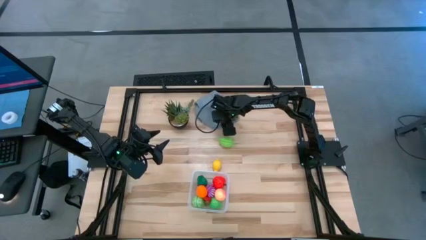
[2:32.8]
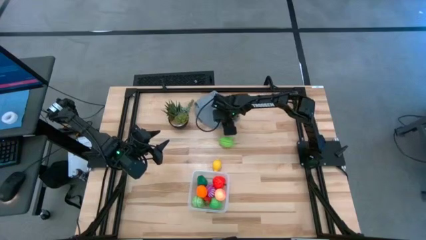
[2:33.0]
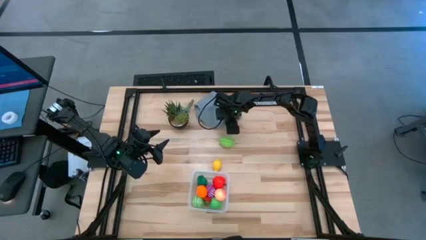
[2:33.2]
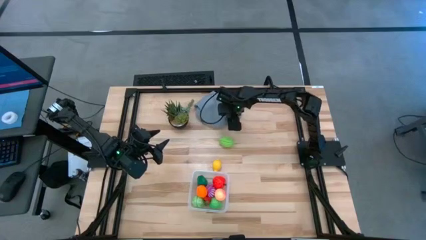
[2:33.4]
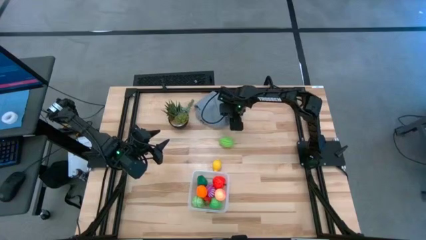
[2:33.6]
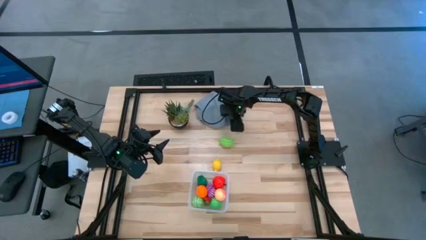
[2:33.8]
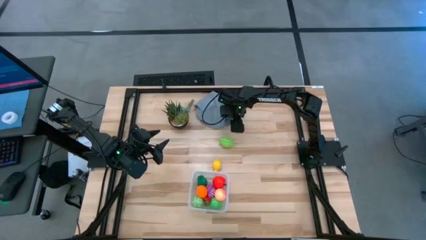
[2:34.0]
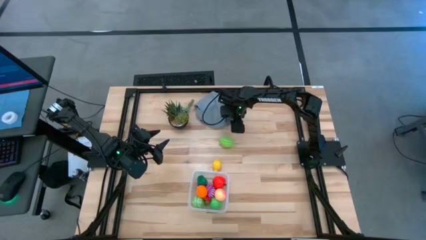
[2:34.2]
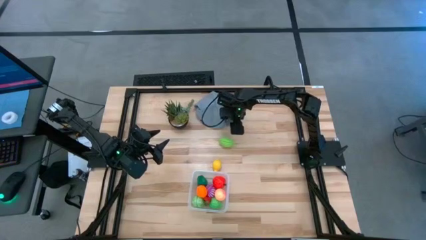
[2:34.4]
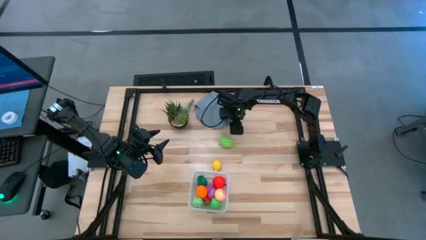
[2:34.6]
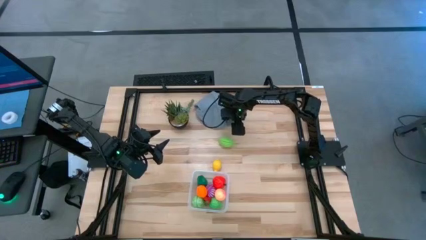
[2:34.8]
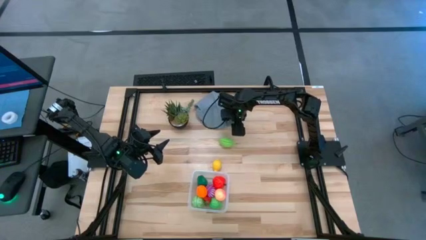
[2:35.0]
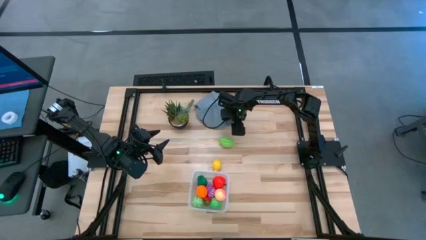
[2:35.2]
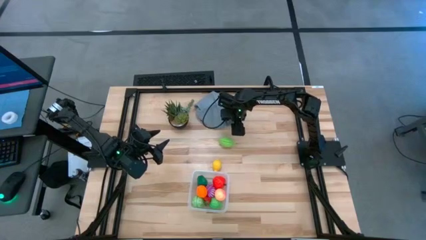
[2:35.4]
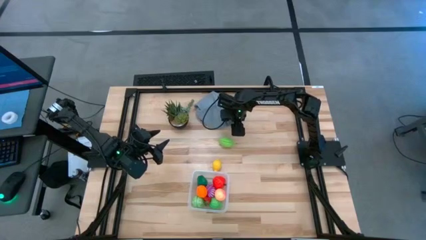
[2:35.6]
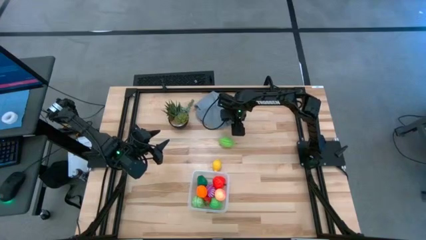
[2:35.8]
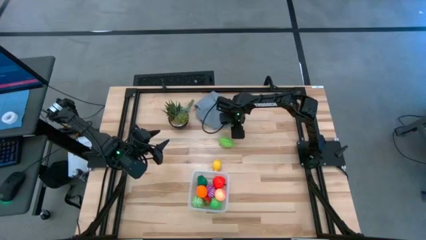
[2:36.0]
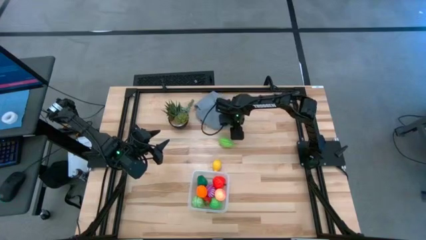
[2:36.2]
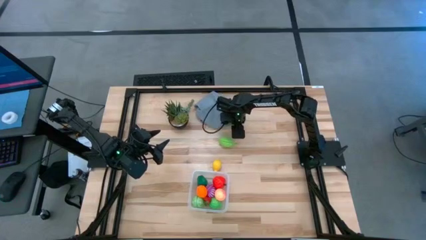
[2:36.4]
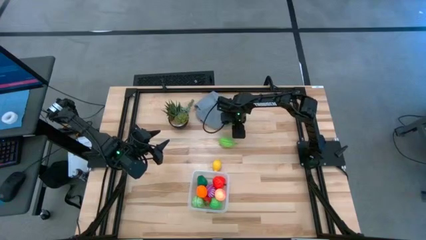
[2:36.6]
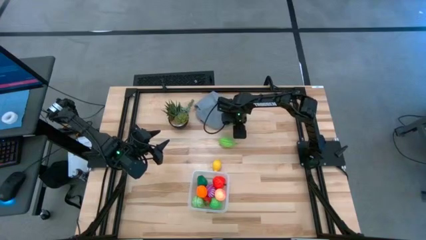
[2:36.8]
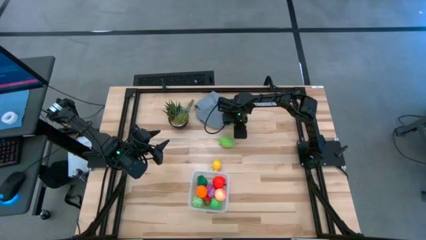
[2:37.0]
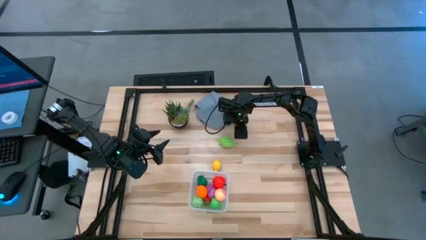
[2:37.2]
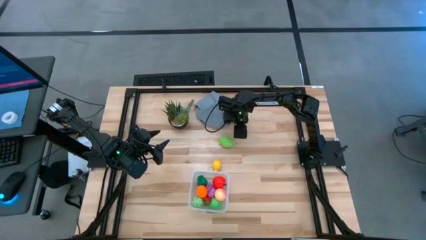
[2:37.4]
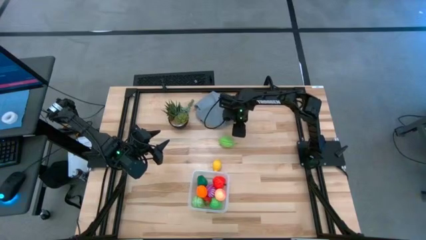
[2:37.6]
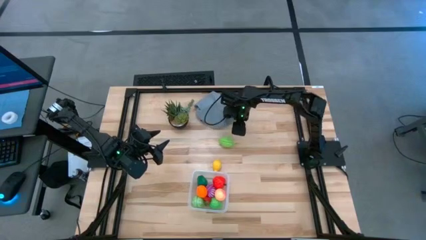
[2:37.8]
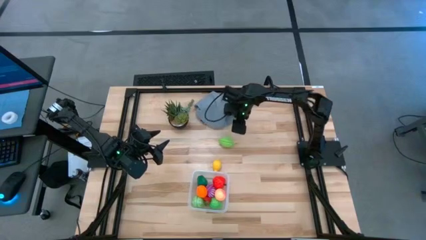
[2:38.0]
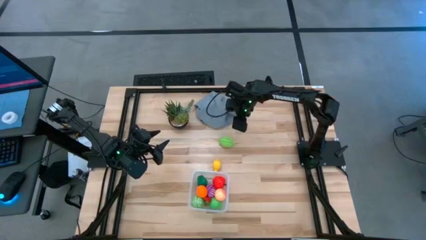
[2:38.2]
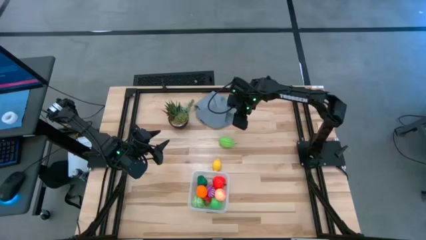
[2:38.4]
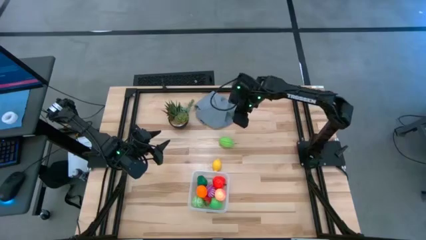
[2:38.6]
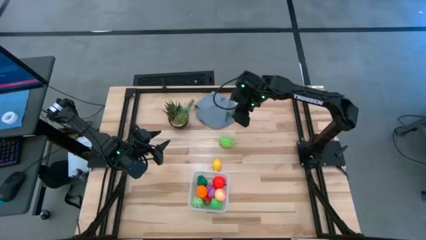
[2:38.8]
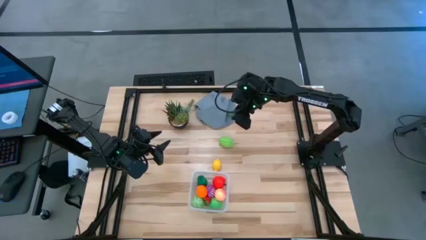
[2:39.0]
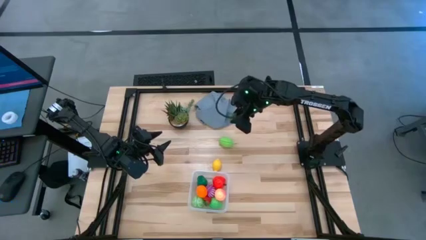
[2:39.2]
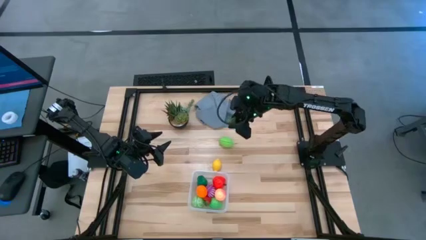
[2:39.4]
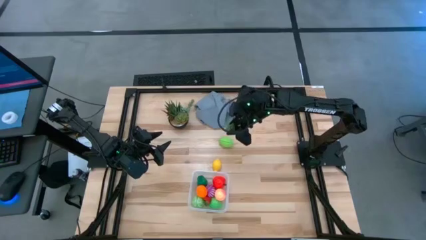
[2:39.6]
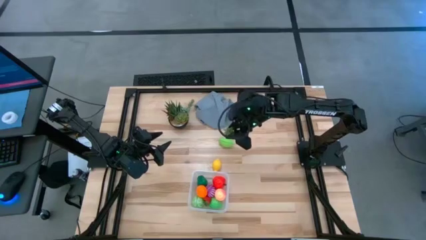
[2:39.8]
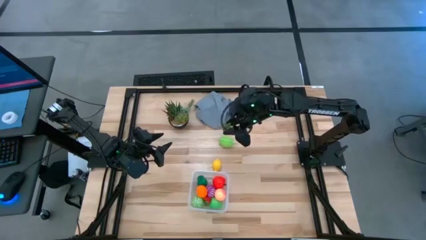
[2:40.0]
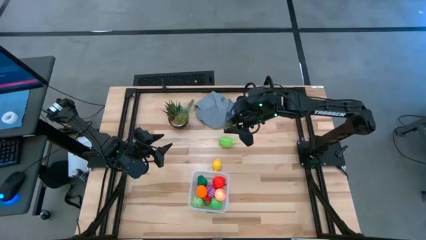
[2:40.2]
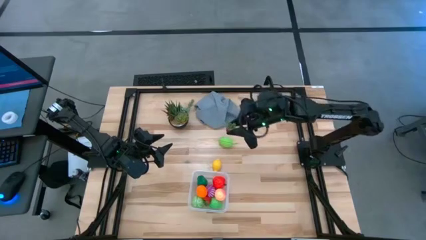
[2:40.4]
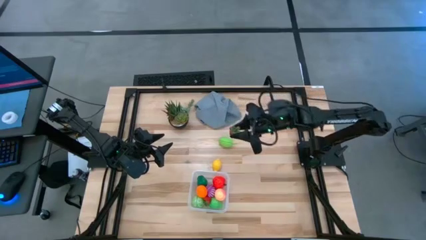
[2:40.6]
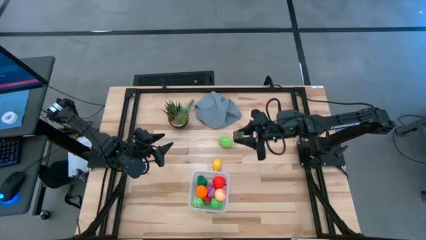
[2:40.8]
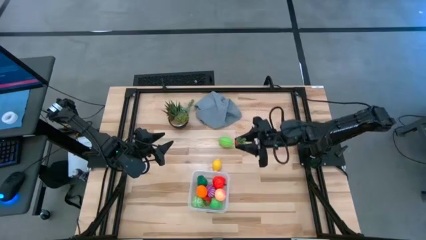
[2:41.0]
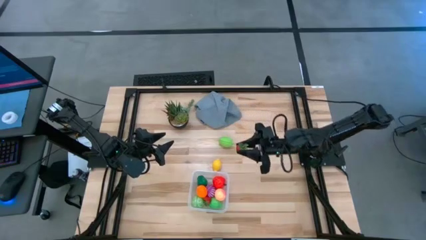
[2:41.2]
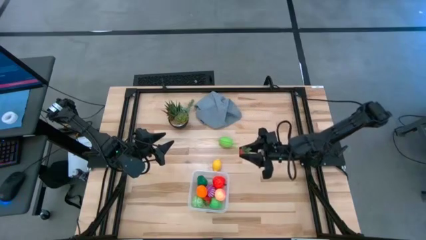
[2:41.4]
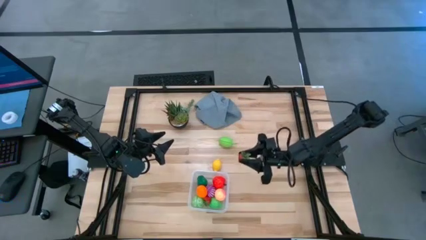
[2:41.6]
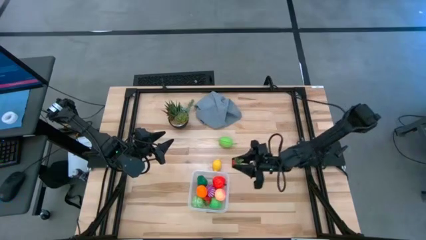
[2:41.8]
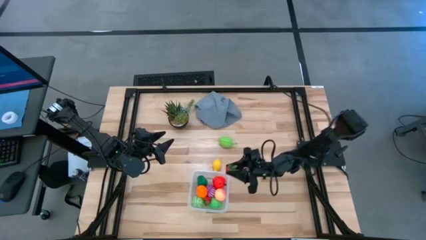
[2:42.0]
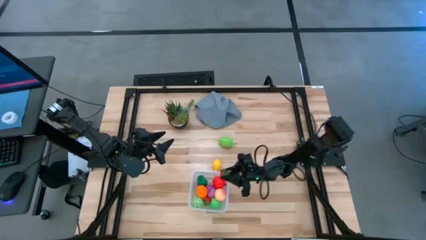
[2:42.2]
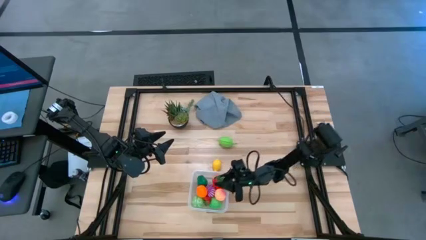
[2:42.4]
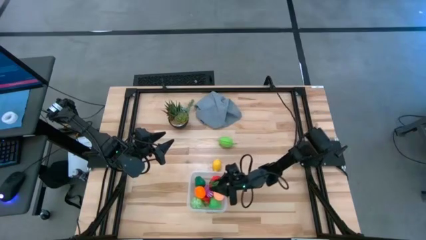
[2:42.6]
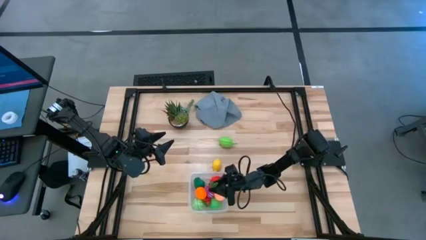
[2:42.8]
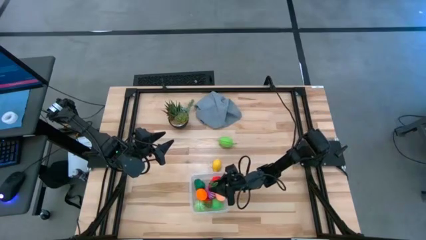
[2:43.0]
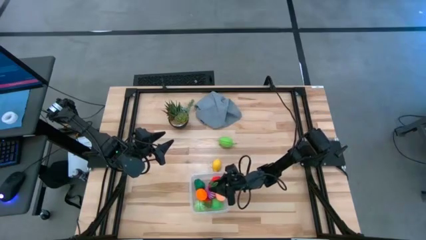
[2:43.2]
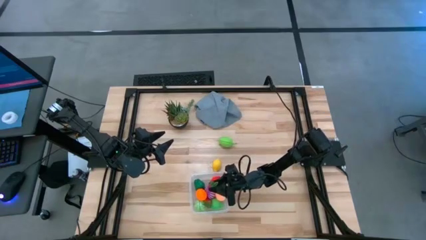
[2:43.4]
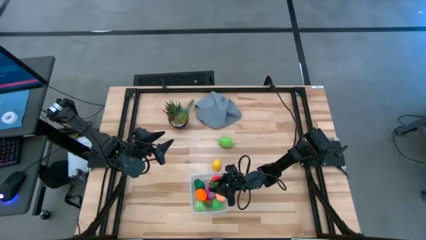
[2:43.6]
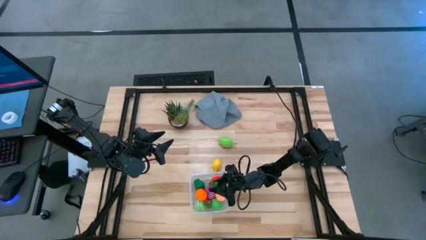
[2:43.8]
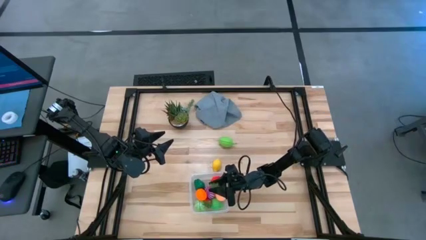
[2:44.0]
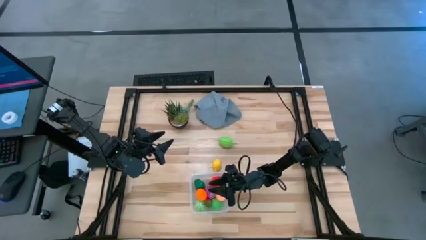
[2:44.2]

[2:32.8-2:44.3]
Task: Pick and placing Produce into tupperware
Put the red strawberry into the transparent bin
